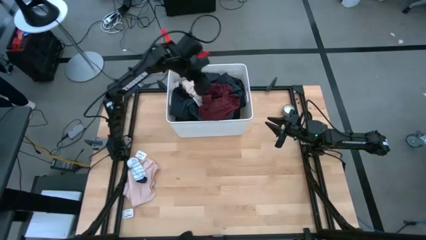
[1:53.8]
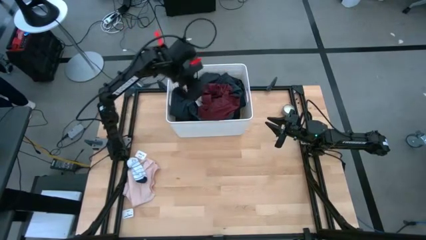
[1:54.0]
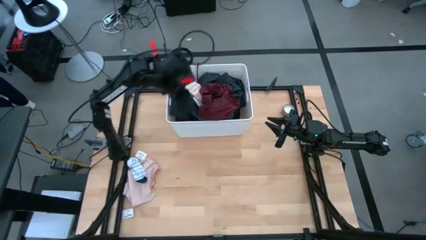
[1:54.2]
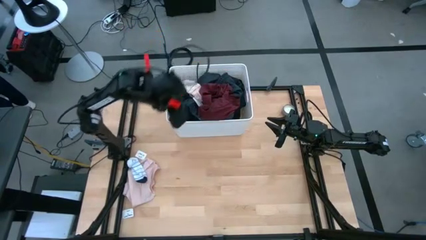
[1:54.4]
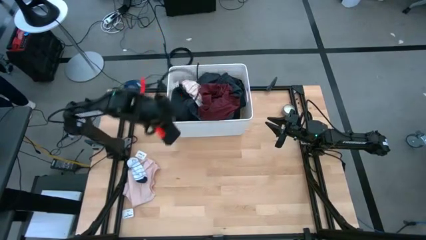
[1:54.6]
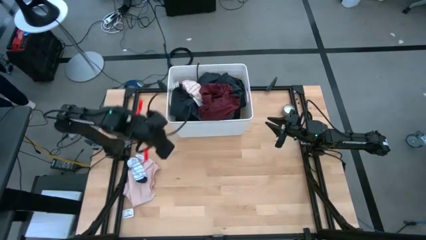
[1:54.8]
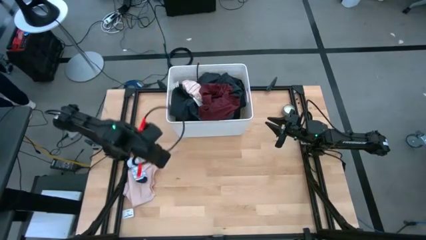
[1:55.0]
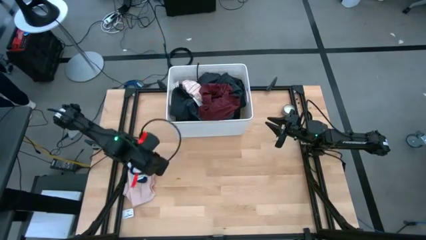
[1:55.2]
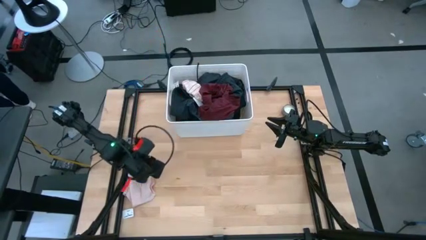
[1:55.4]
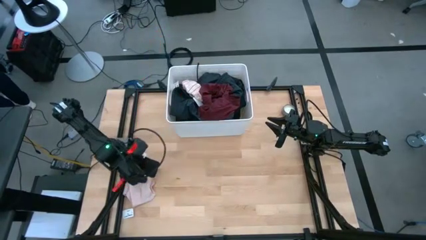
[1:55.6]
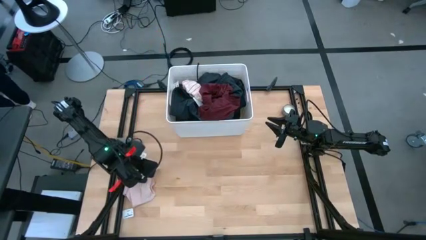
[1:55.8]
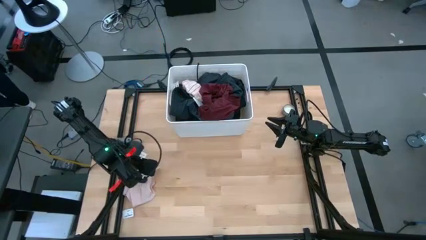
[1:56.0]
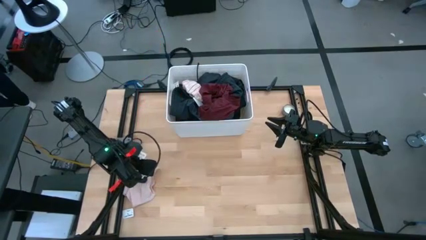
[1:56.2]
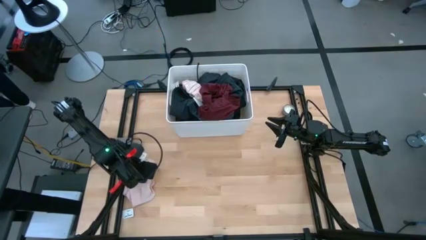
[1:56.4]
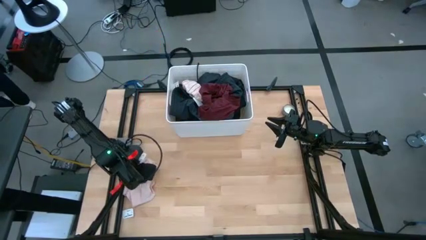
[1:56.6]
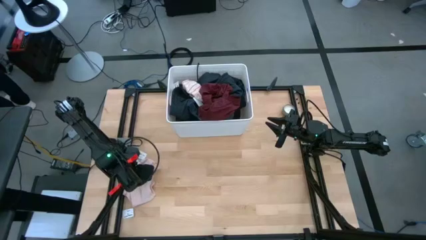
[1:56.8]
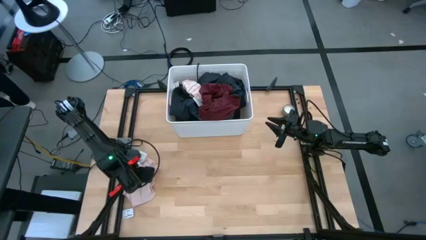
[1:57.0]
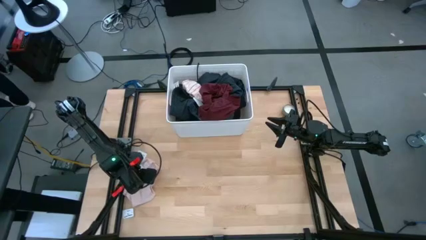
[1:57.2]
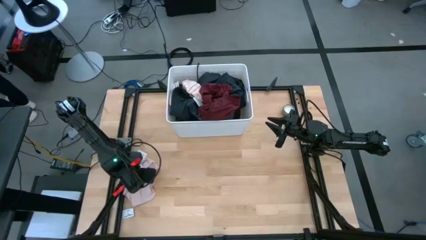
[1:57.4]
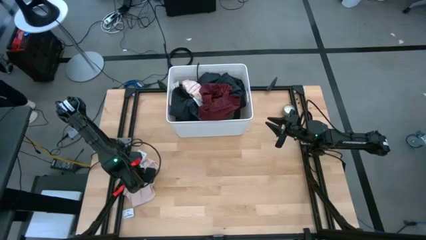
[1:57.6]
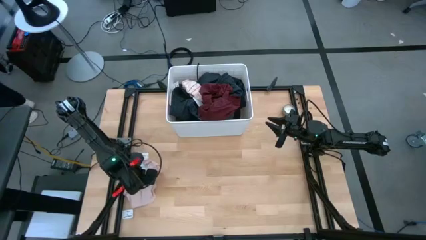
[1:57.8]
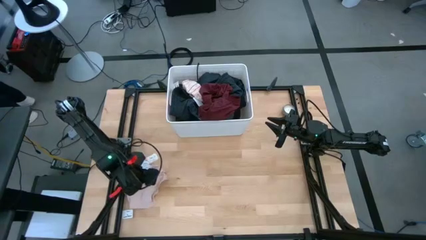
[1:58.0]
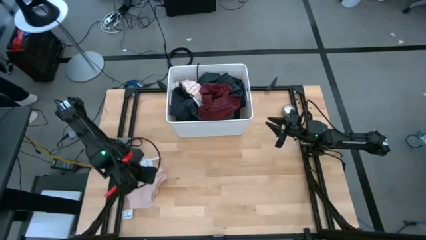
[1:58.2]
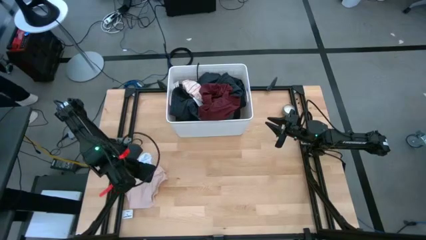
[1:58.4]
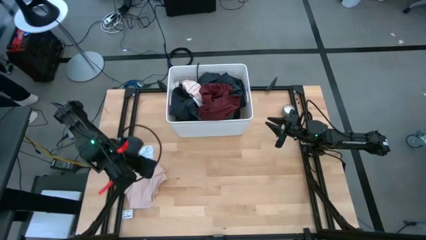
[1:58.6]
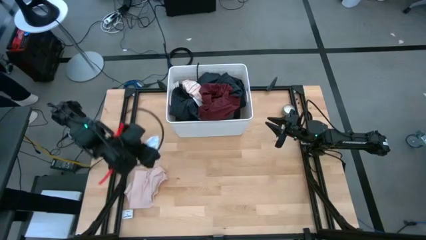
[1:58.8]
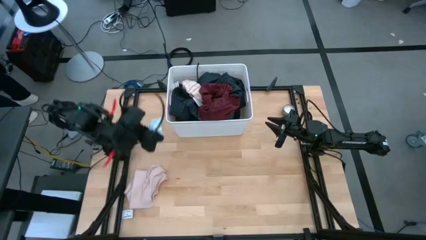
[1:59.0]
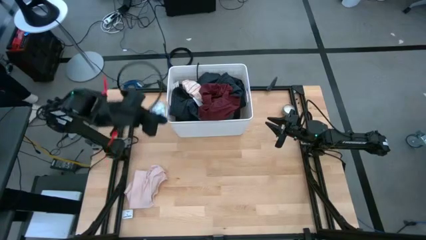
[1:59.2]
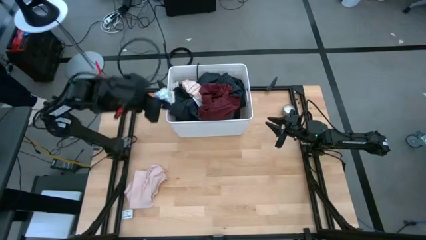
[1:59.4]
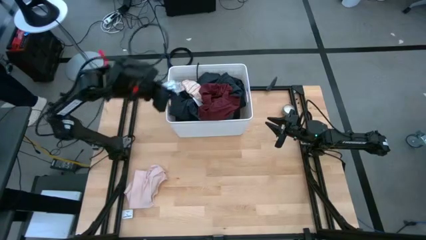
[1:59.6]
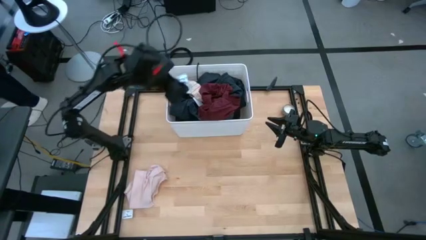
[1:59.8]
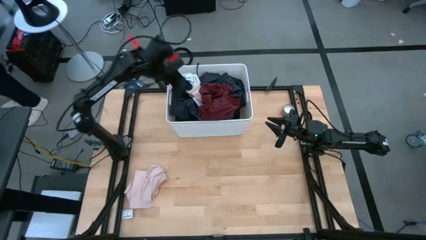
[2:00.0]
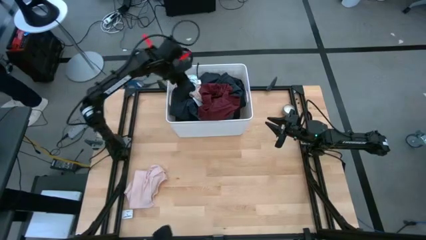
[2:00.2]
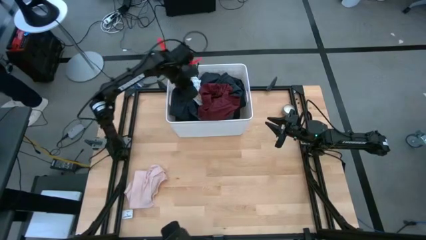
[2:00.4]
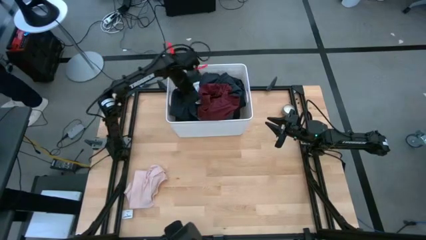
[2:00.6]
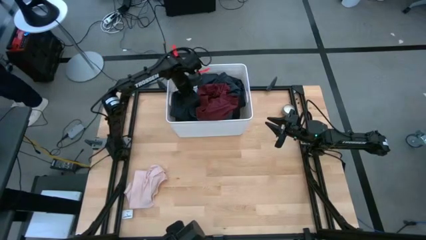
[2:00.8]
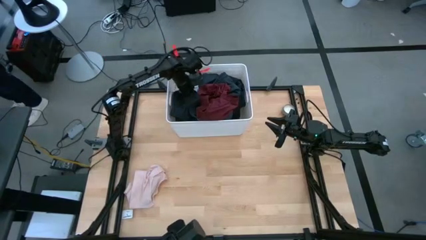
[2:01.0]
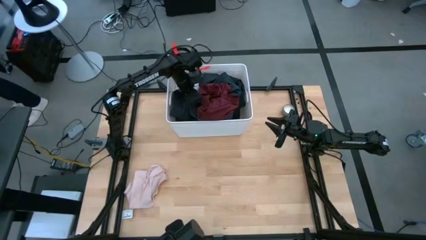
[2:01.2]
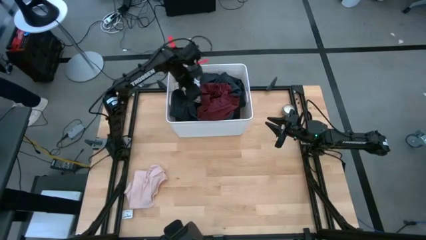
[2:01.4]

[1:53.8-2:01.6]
Task: Sort clothes
Put the white sock into the white laundry bin

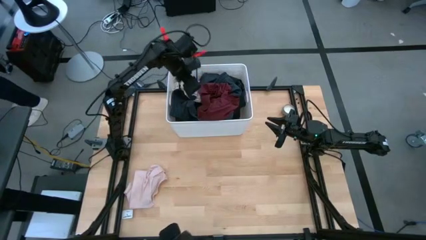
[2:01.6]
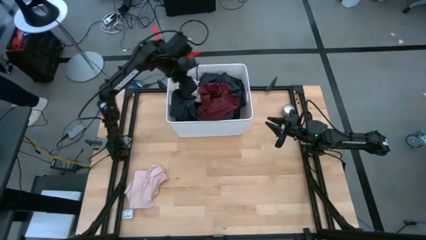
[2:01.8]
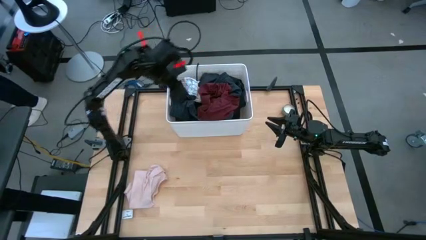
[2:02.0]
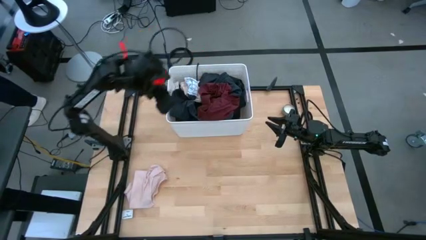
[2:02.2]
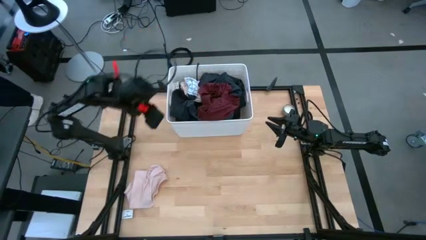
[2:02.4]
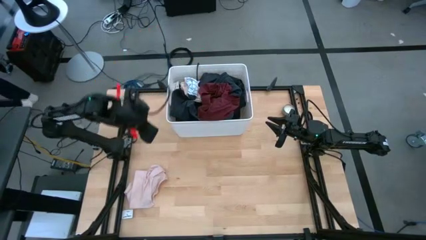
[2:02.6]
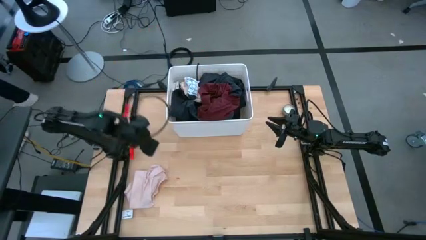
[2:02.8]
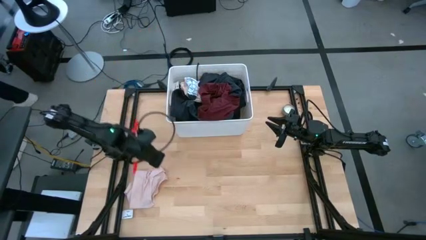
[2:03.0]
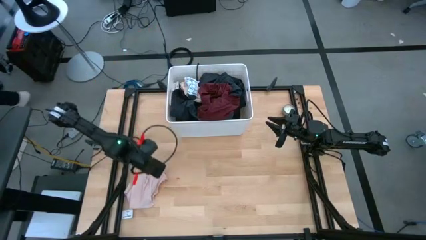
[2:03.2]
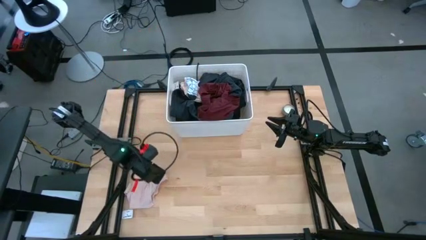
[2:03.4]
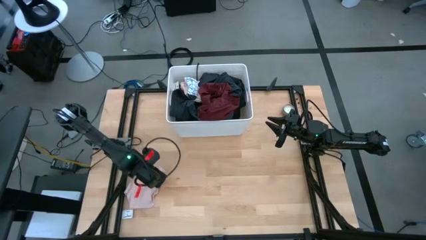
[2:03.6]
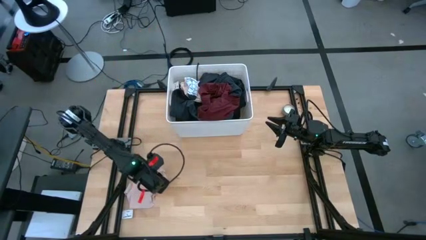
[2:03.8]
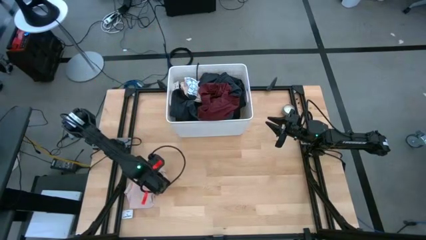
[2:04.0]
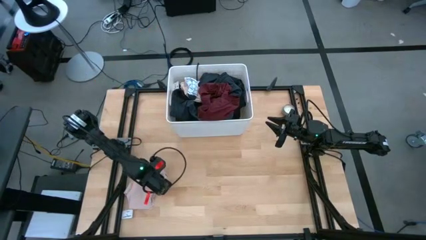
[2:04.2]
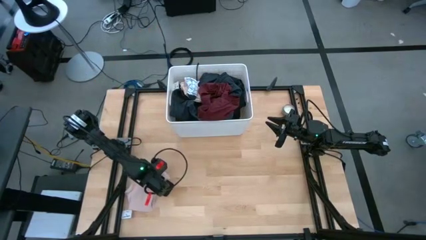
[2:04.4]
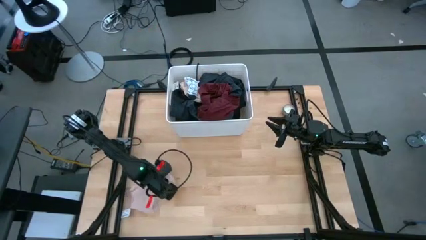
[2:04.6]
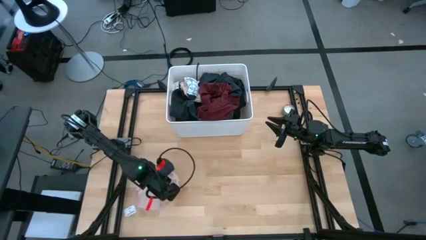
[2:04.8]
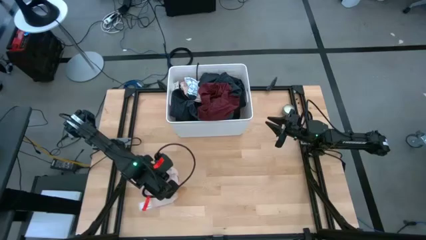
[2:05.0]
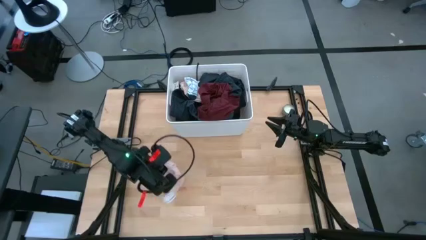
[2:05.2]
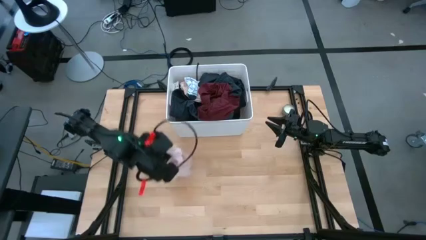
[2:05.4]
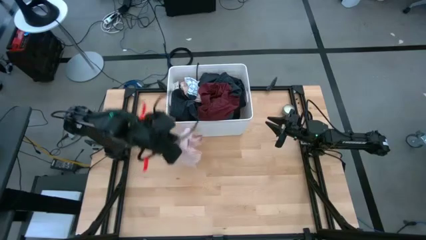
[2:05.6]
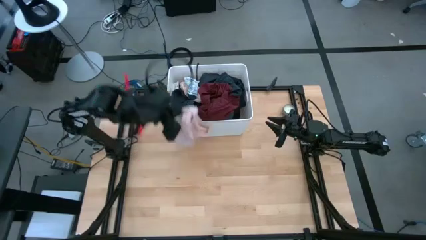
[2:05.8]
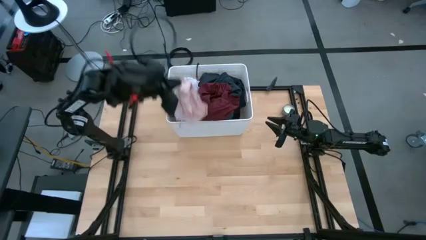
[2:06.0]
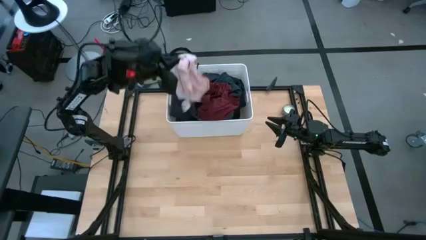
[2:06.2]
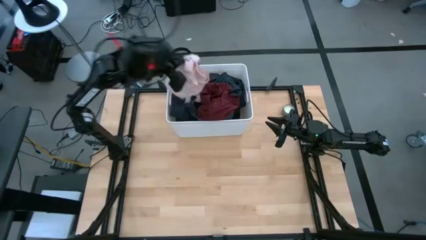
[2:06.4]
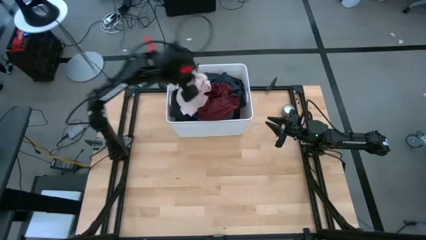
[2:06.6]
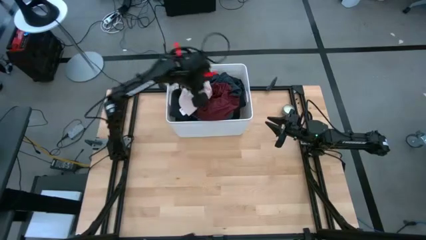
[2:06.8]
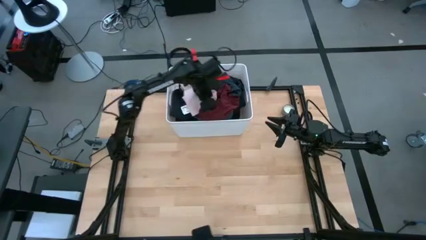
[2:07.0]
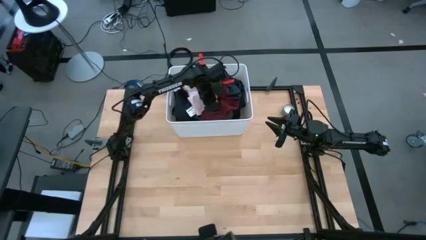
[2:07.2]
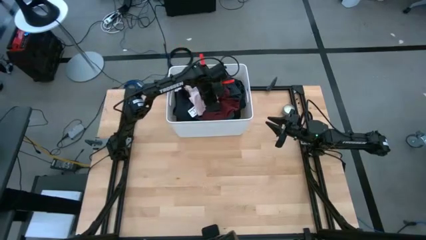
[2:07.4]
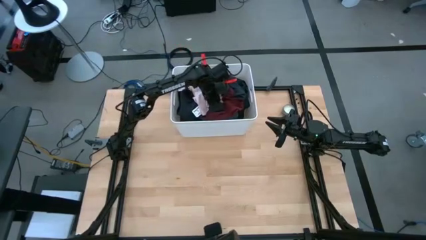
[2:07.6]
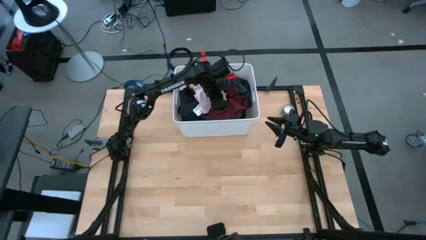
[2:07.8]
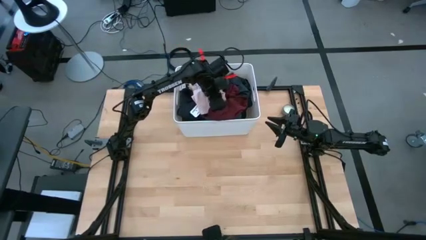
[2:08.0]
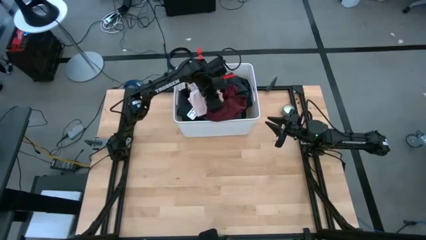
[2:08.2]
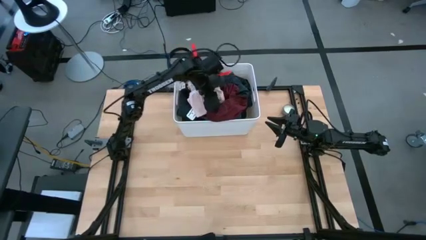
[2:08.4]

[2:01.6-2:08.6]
Put the pink underwear into the white laundry bin

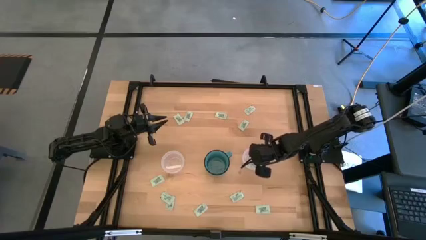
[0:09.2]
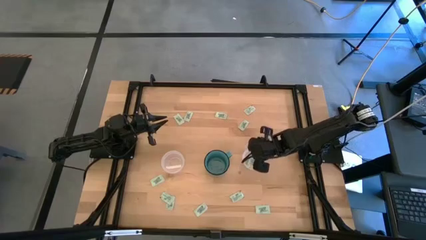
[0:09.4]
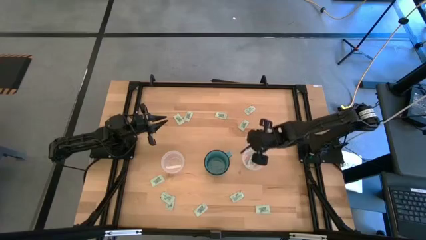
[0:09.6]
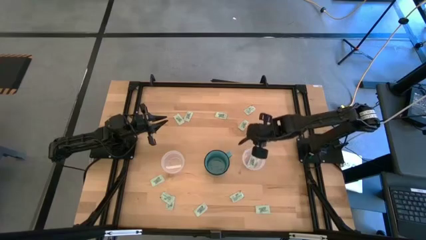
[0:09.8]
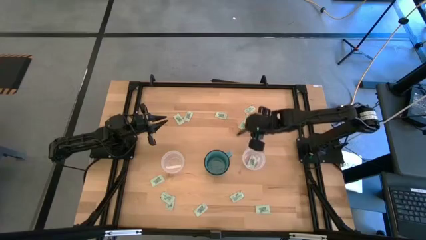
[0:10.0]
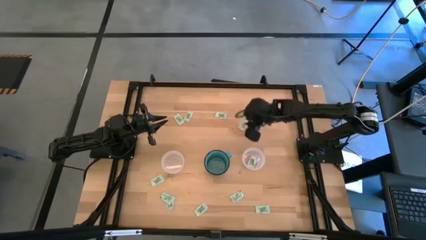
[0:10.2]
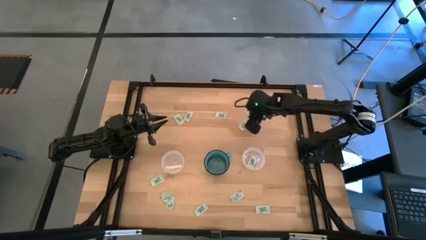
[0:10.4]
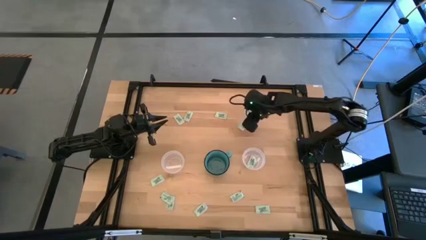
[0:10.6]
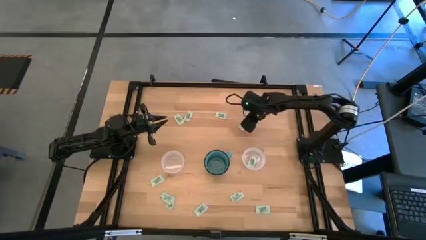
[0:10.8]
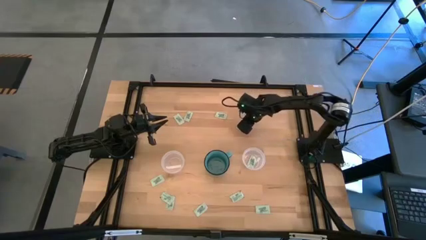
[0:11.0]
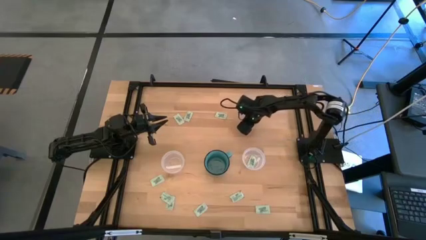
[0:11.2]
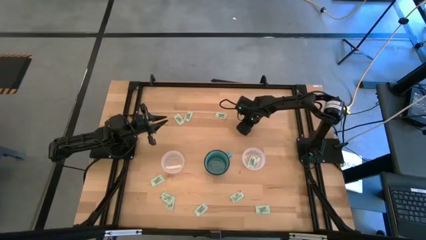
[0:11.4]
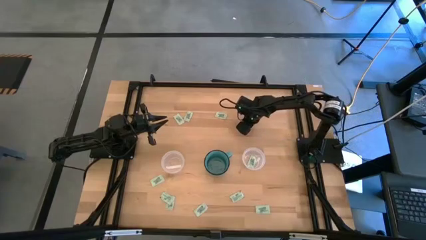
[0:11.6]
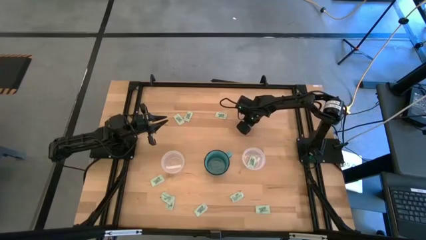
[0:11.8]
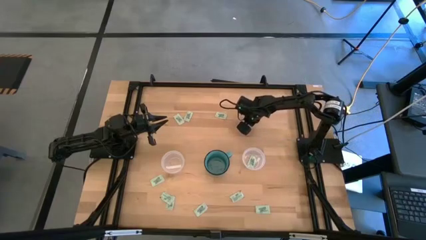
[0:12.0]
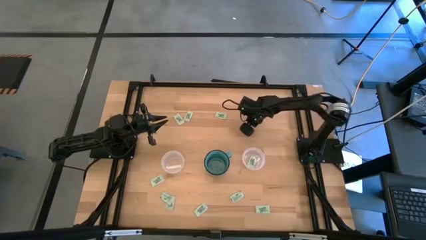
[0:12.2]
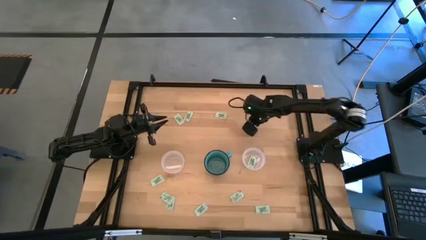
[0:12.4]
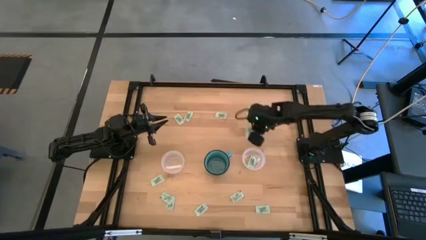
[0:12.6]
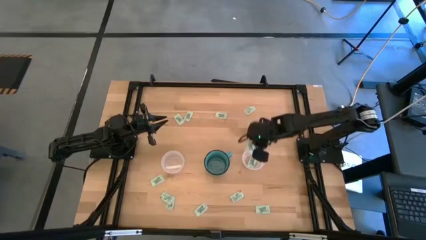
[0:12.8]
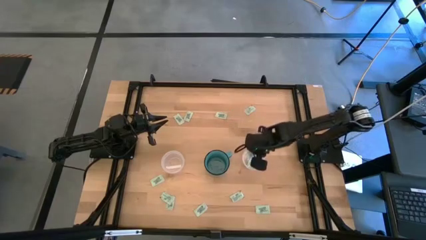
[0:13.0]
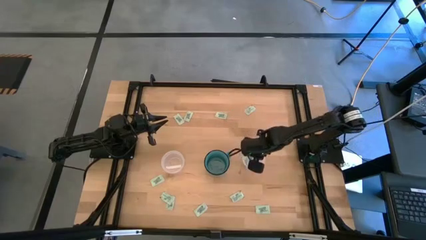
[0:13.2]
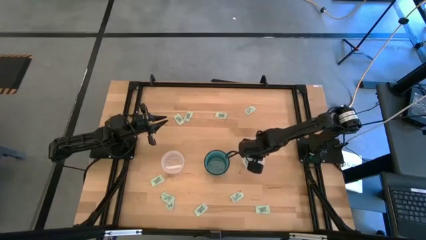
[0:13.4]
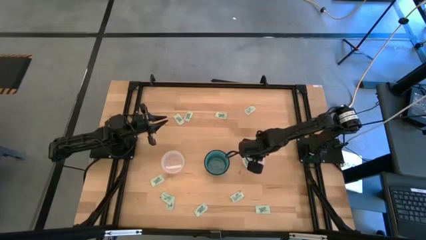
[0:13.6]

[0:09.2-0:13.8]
Task: Pick and place Stevia / Truvia into bins
Put the green stevia packet into the right transparent container
